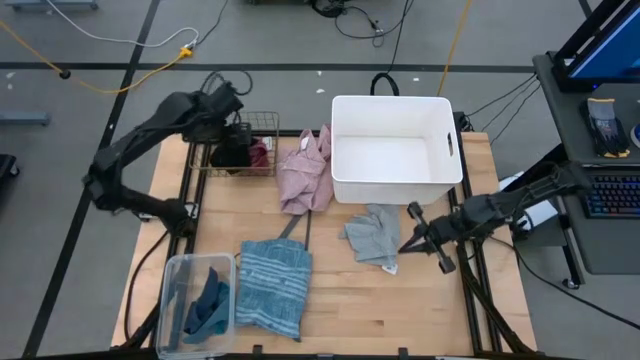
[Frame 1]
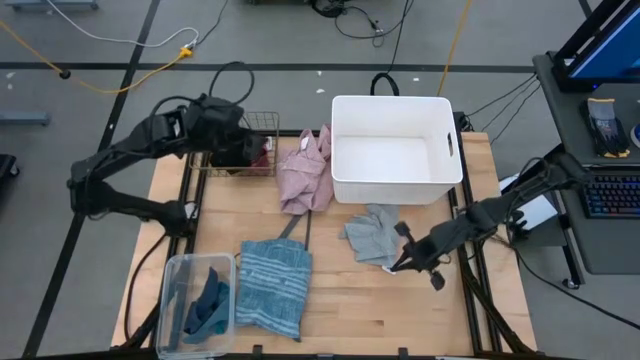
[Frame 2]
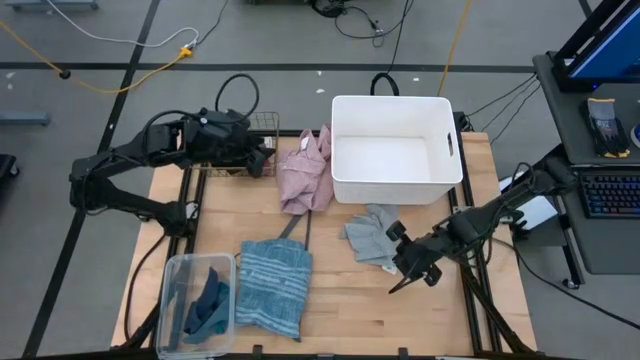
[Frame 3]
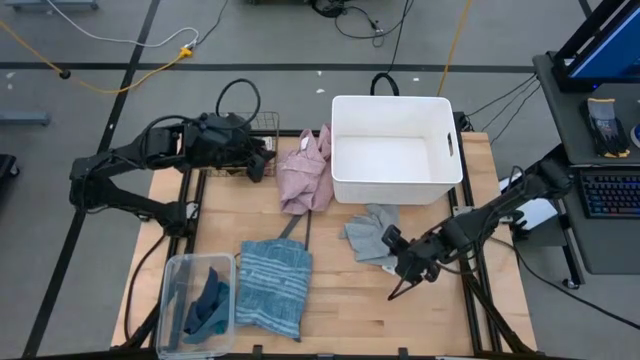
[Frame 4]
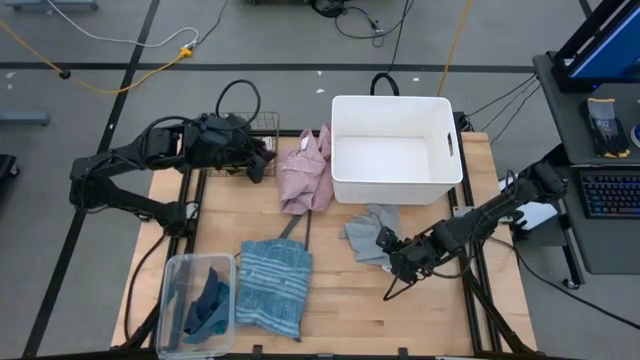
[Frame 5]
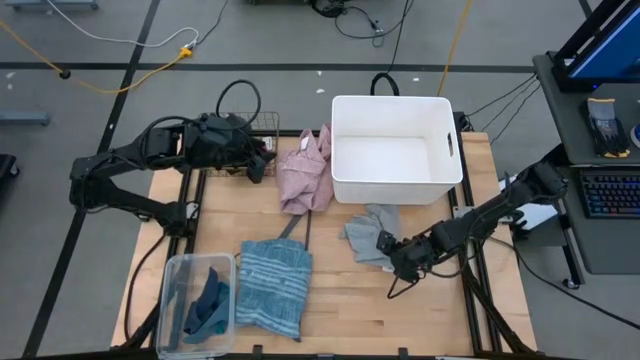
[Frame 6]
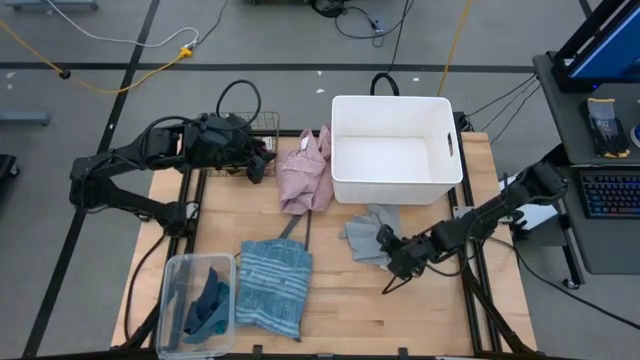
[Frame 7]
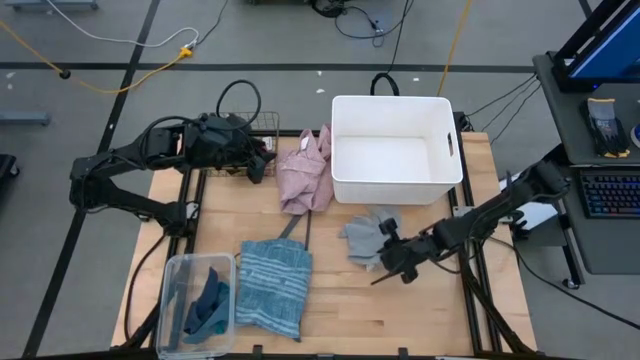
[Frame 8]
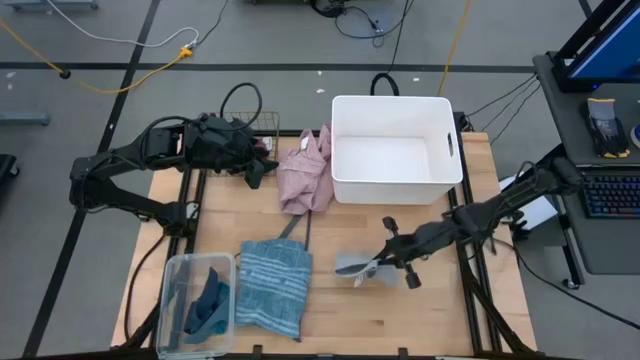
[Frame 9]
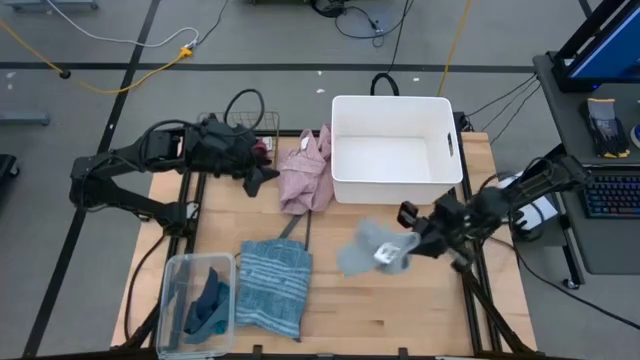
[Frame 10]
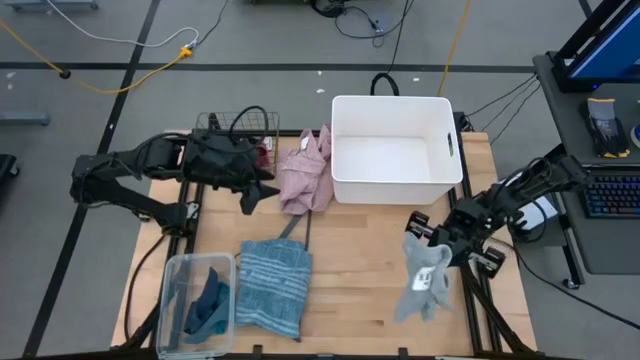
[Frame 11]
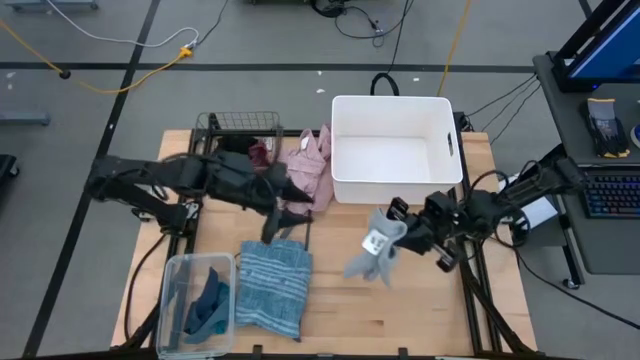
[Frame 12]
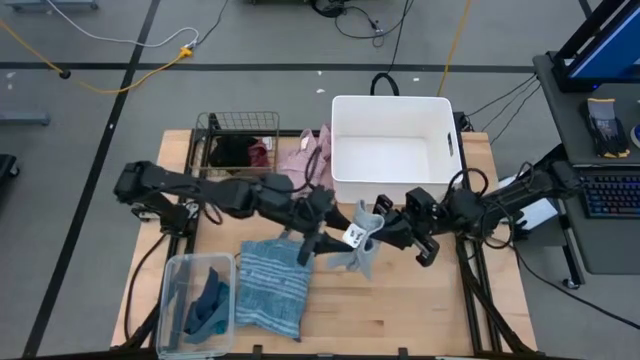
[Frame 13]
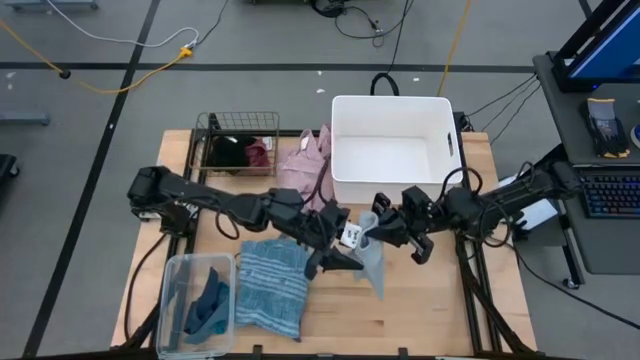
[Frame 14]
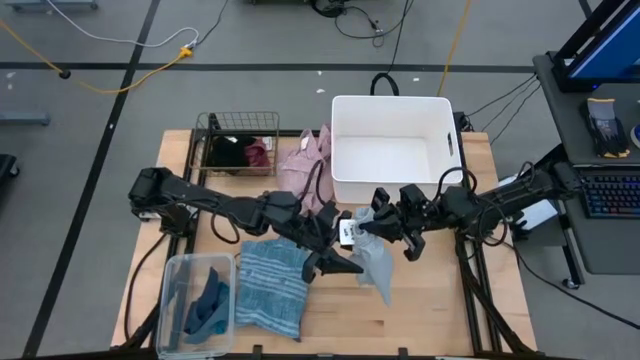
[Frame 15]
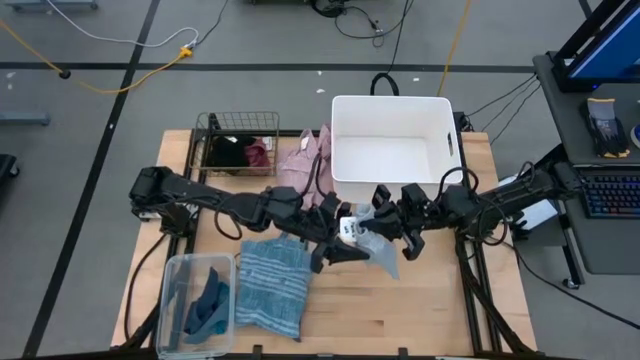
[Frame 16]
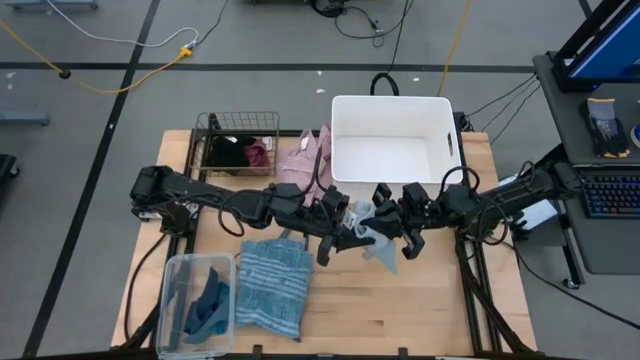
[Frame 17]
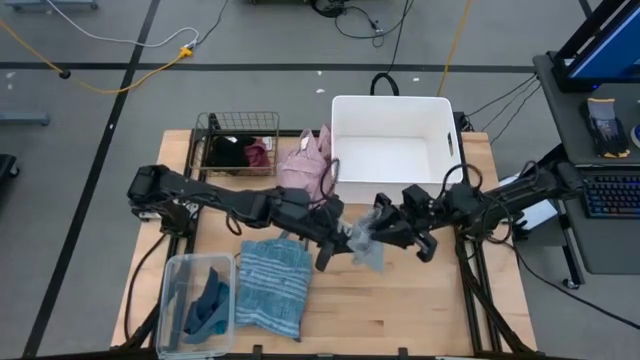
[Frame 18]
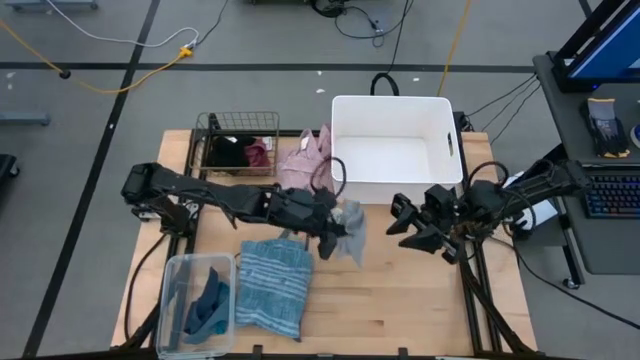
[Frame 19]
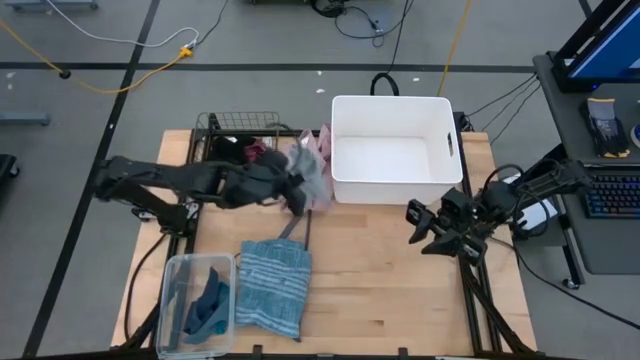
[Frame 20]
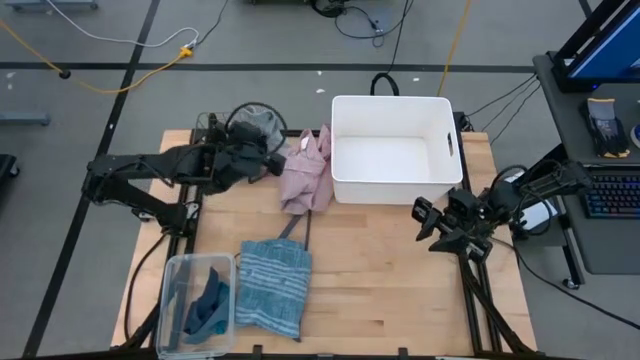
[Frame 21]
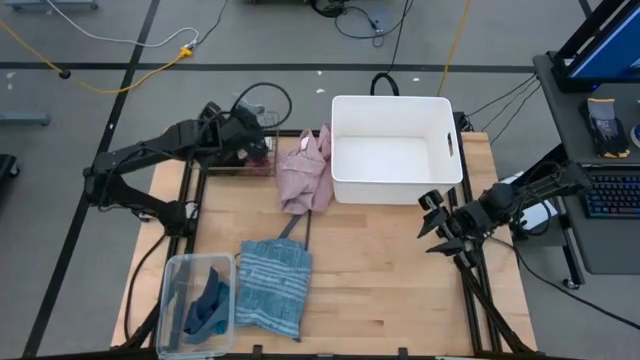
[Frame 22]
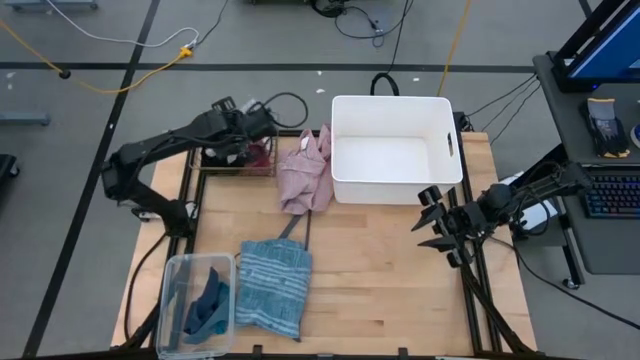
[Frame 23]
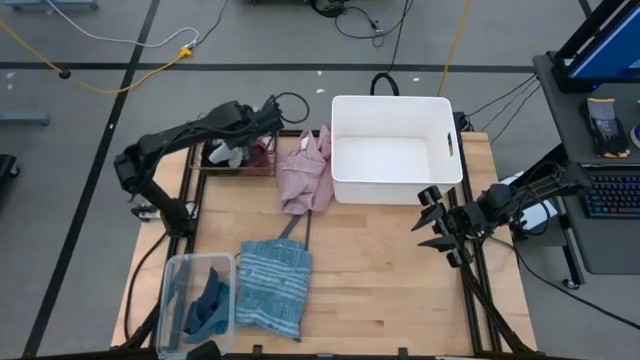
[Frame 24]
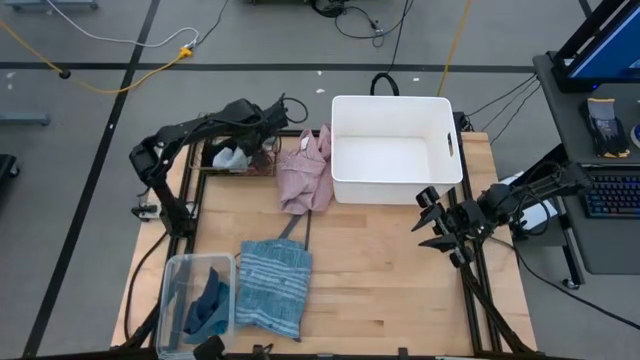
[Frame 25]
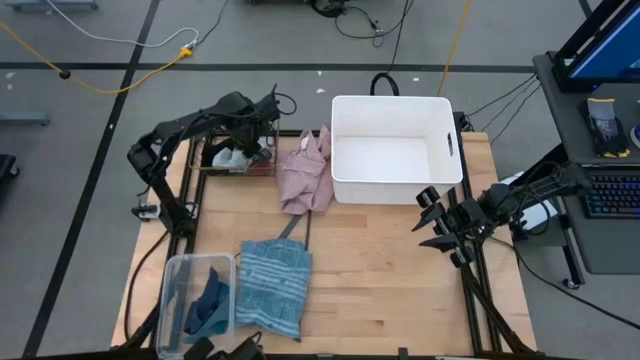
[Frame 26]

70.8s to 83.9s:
Task: Pick & Place Cloths
Put the gray underwear into the wire basket

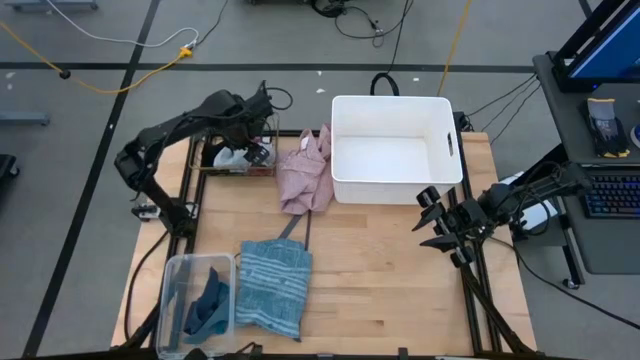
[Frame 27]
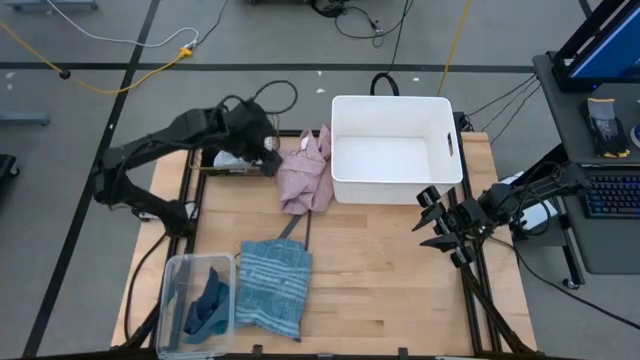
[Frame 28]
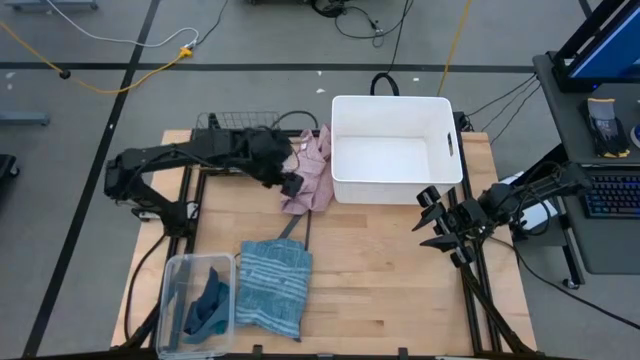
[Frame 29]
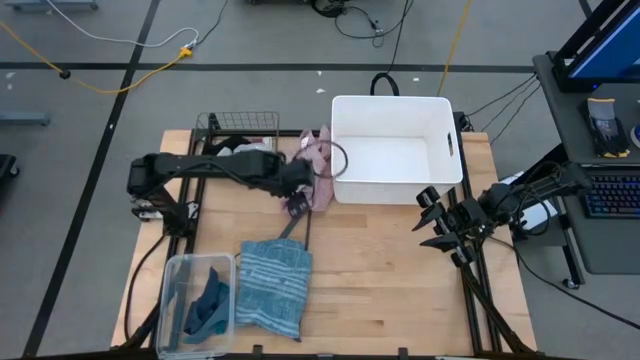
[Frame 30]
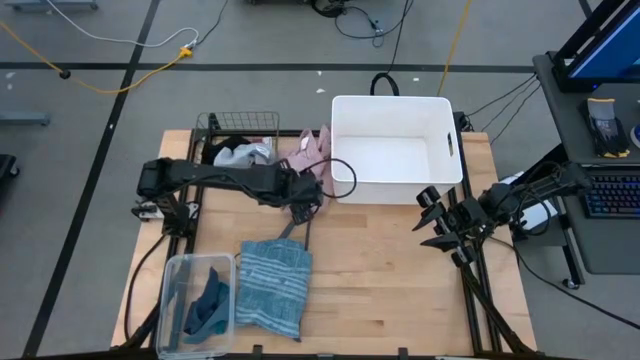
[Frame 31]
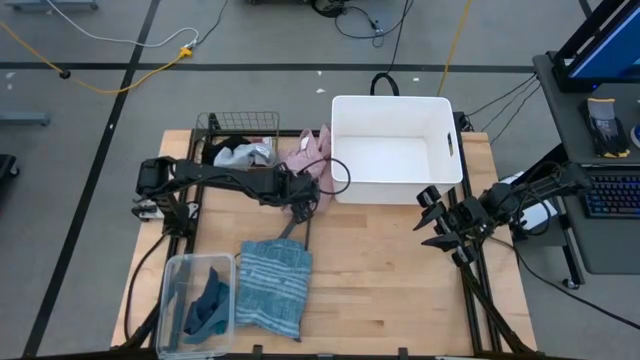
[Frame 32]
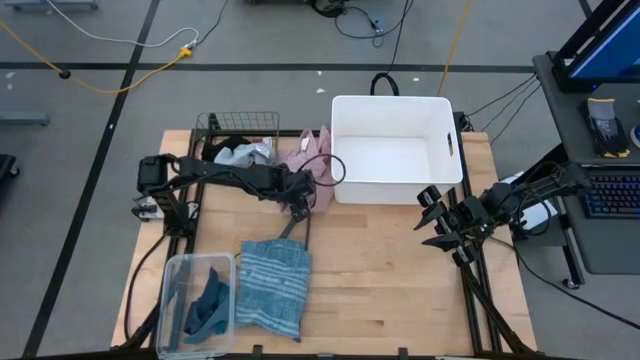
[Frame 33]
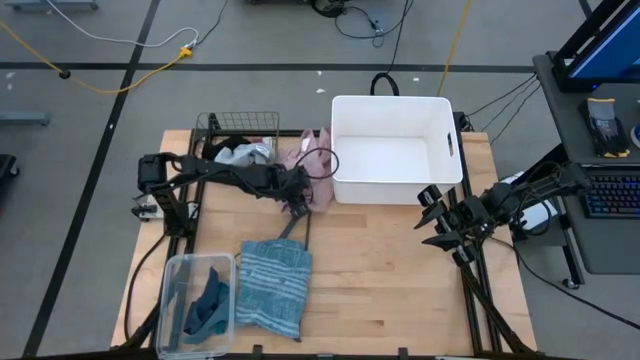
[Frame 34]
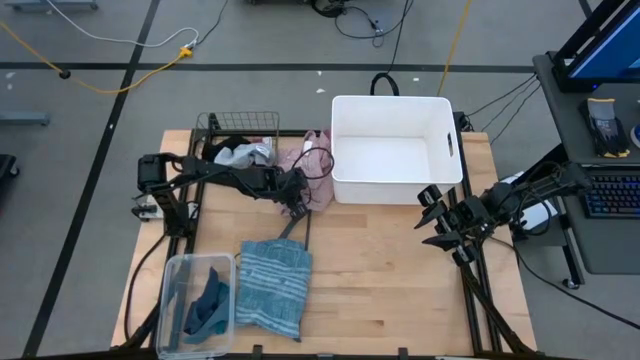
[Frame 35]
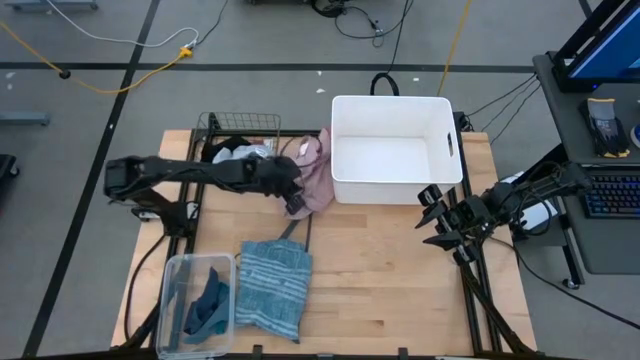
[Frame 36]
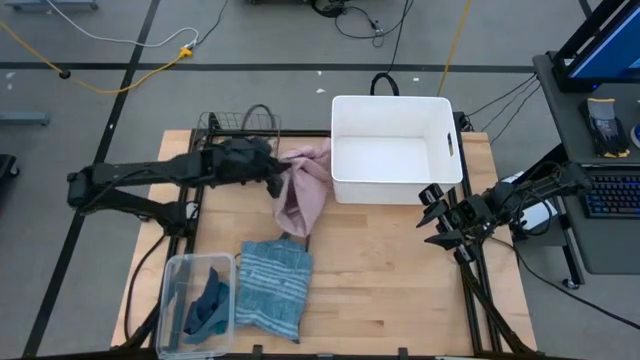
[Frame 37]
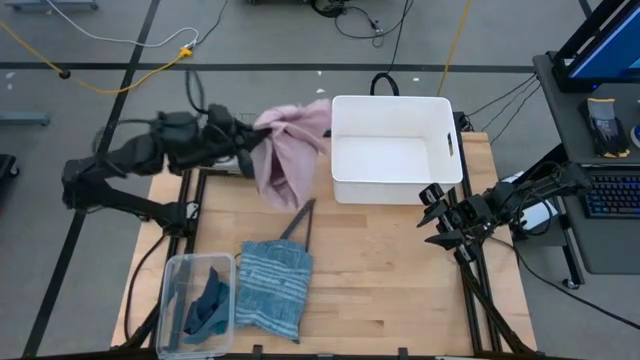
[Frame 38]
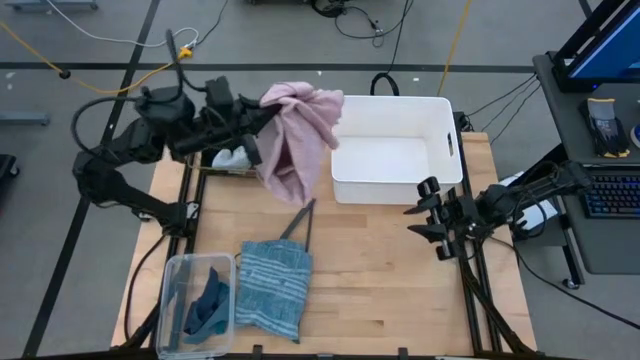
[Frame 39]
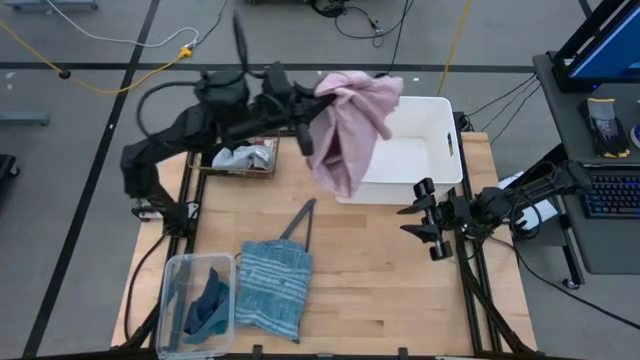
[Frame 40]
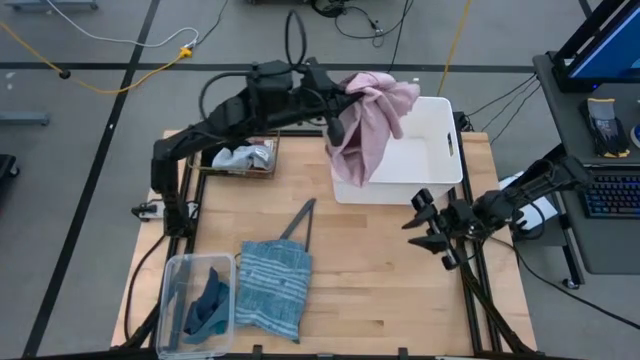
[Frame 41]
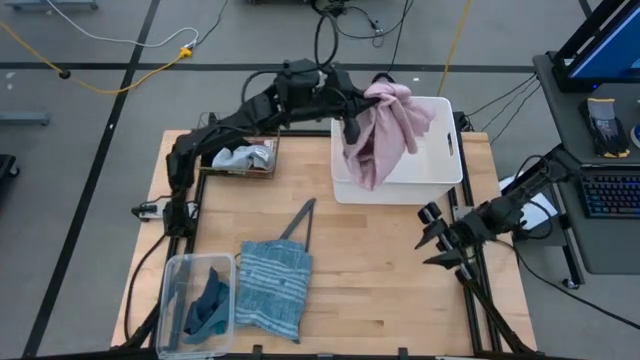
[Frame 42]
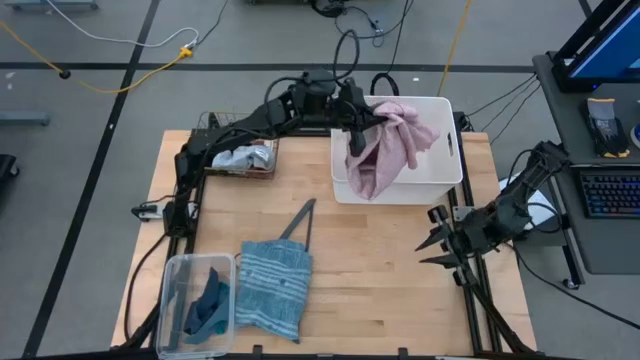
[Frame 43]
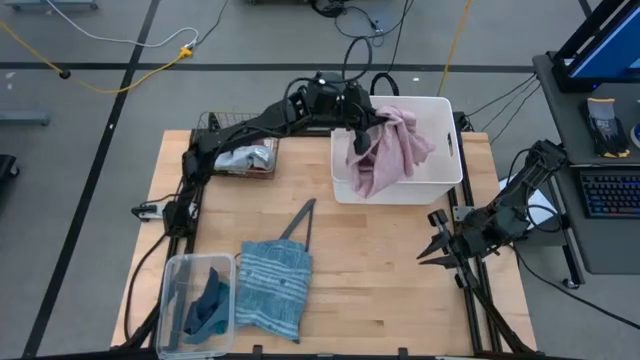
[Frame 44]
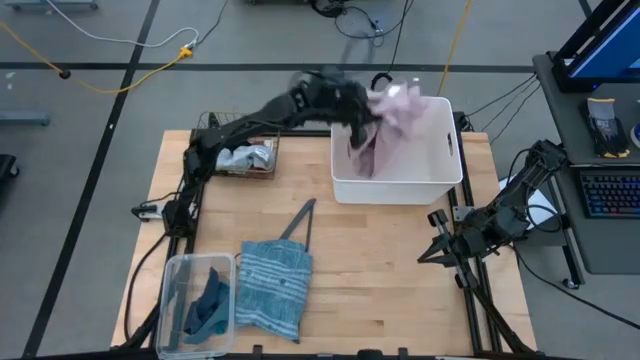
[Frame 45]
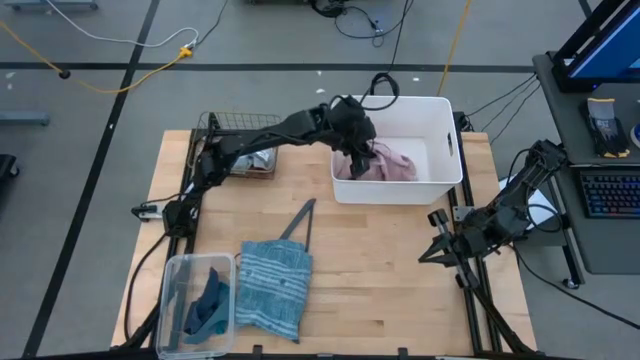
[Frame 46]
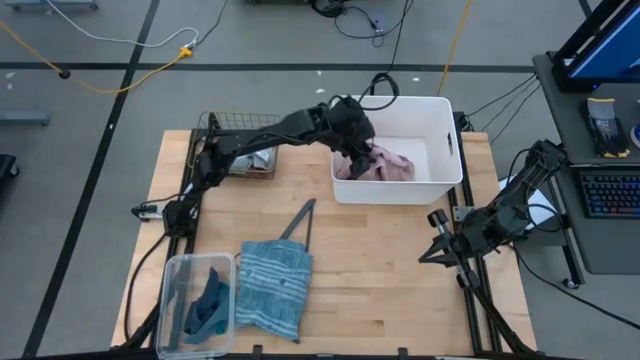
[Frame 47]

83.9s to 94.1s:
Put the pink polo shirt into the white bin
